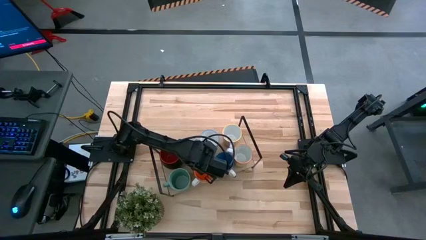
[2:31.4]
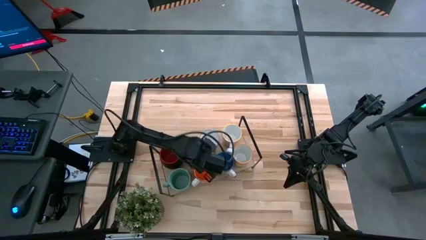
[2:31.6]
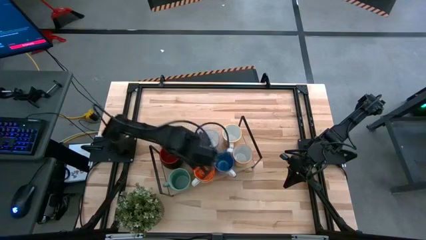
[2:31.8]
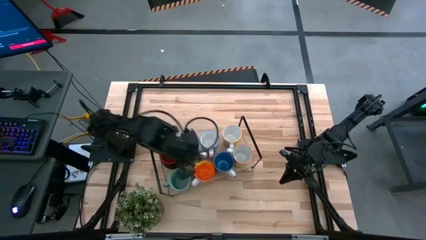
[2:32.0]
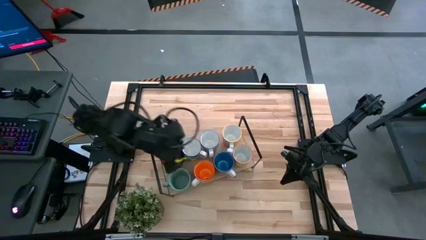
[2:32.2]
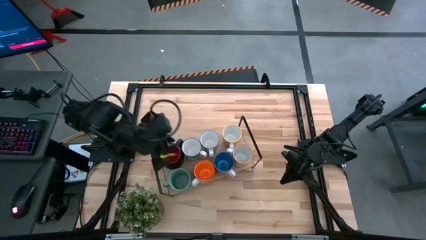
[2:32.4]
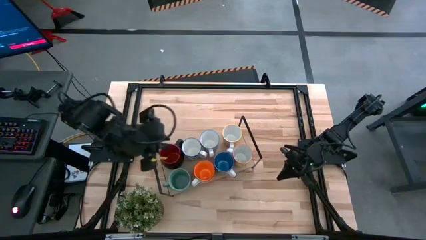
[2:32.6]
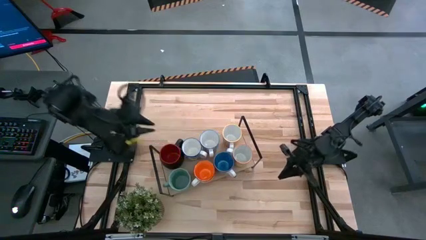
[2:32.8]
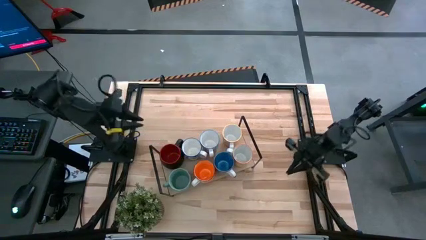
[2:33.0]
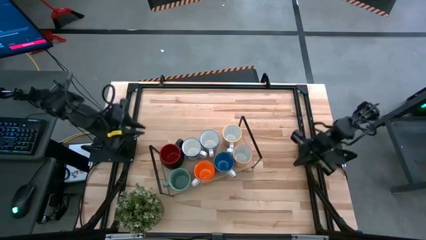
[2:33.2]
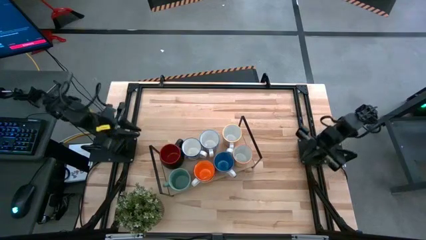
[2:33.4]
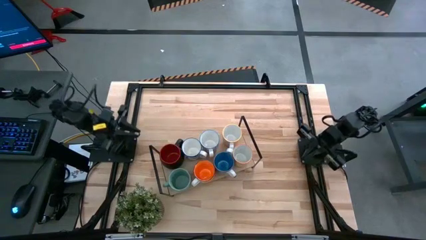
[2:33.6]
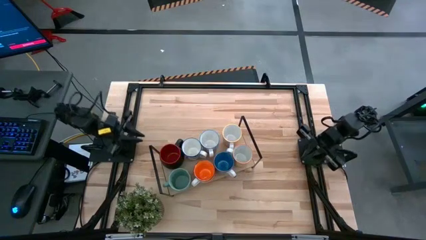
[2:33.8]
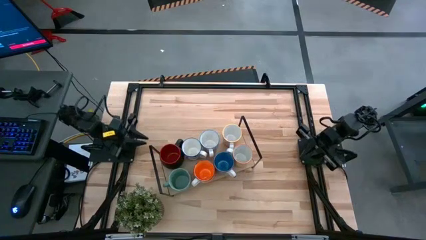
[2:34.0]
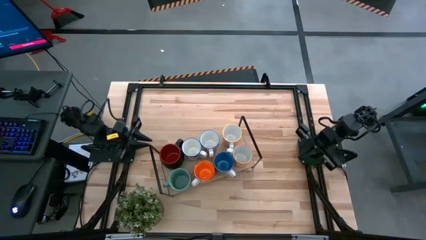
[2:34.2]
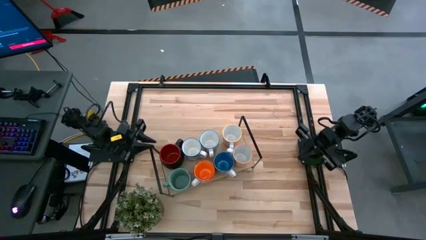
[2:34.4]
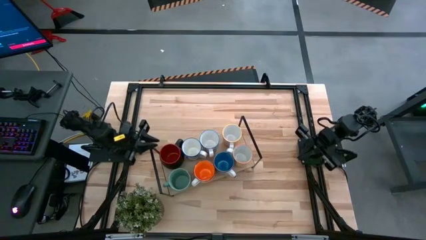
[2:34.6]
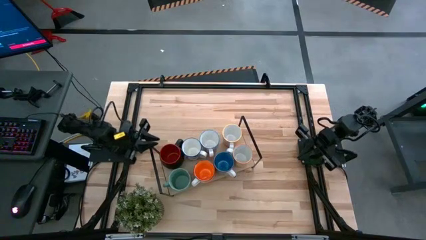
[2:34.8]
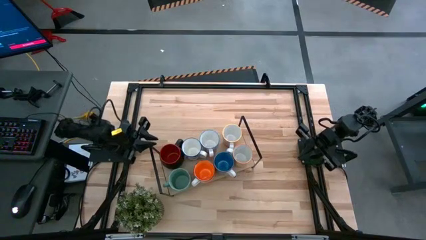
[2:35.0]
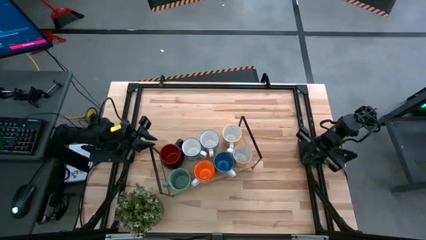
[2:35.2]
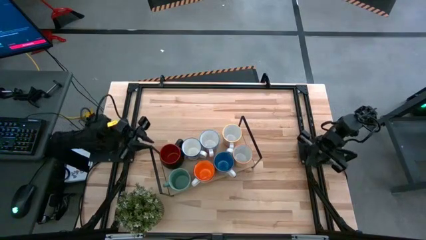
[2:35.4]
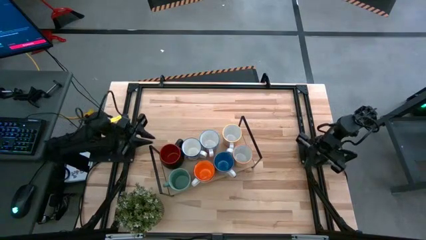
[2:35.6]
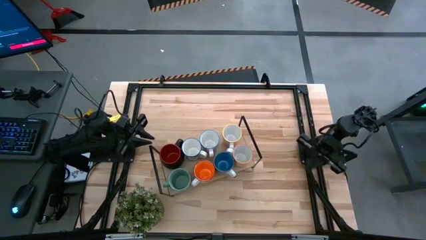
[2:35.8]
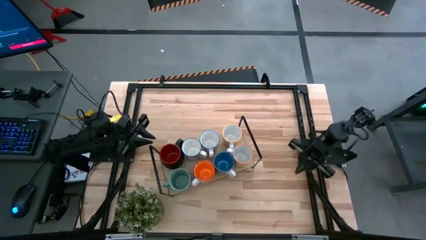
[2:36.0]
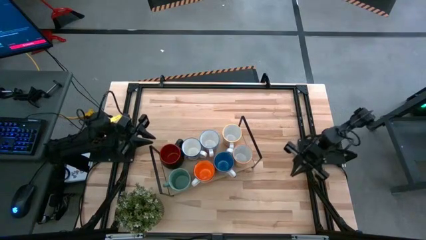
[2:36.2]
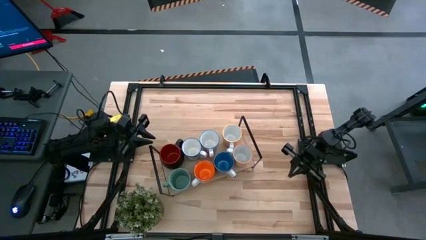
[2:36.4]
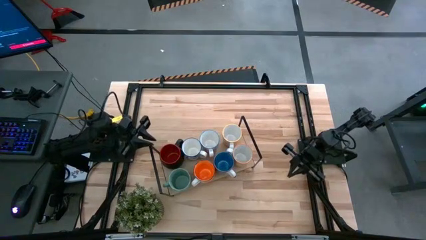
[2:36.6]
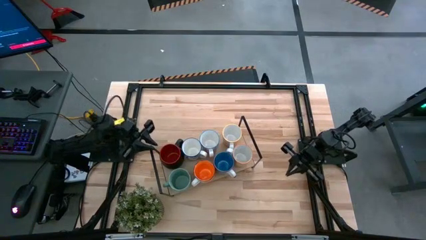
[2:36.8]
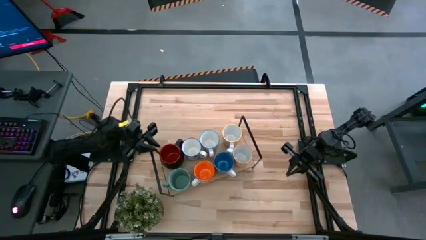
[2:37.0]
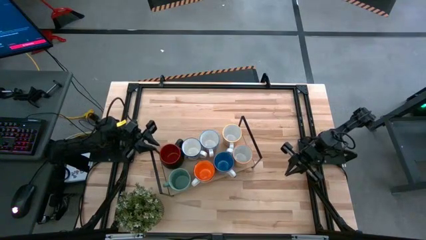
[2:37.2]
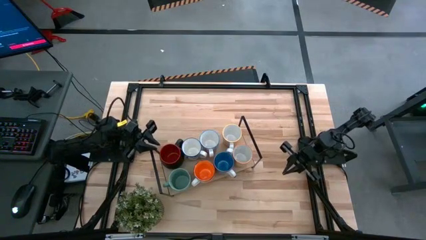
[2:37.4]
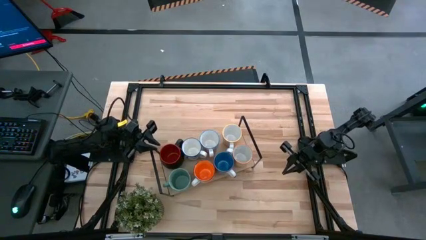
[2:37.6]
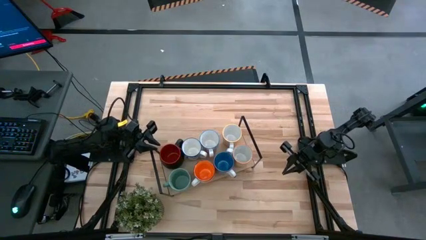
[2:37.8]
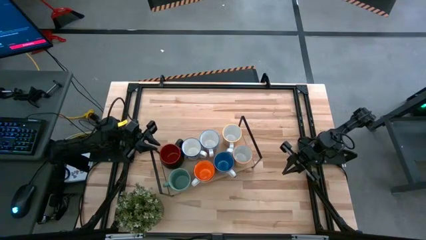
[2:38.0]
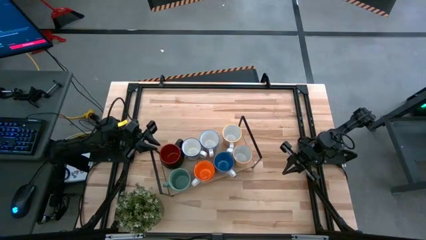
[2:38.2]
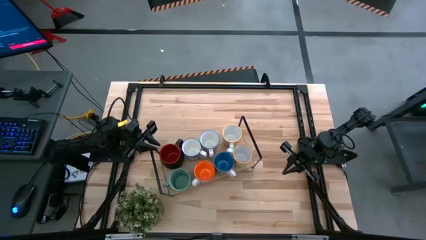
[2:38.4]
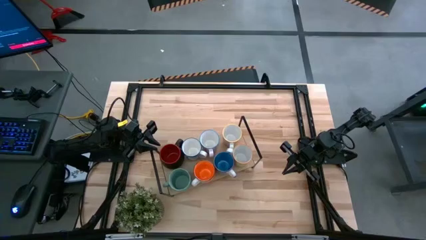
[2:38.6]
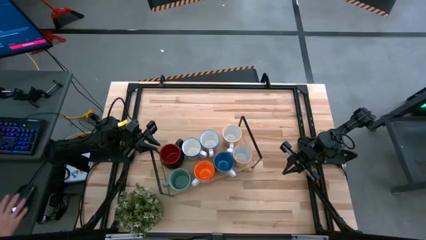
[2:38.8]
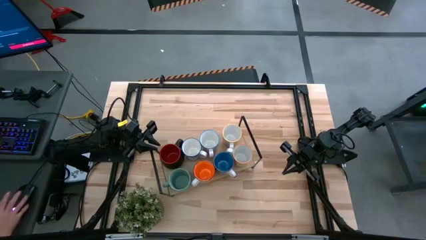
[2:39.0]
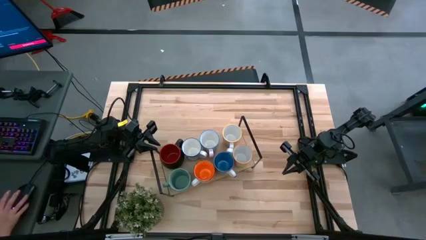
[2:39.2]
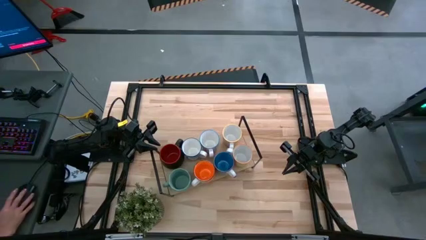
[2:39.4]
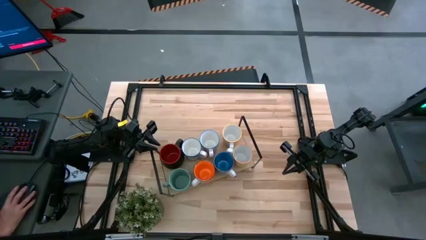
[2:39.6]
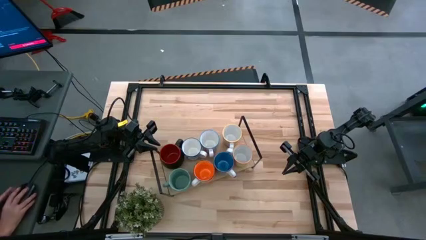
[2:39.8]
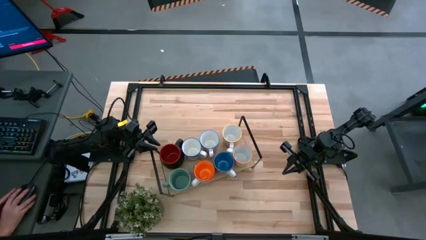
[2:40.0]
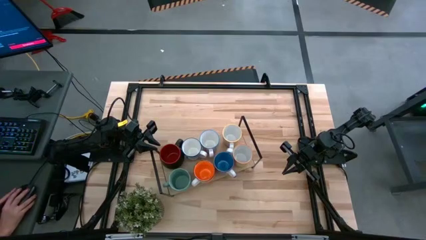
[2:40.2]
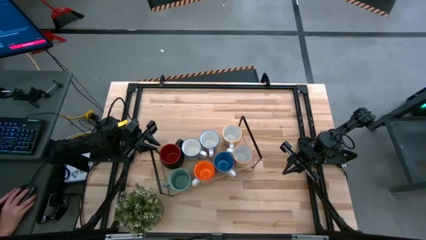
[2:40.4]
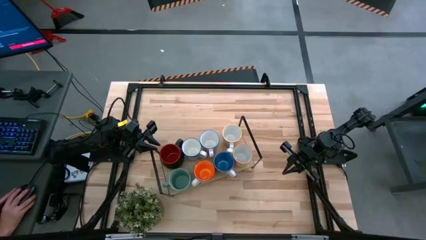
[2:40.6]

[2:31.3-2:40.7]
Task: Place coffee mugs
Return to Home Position

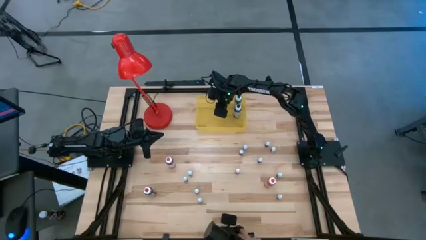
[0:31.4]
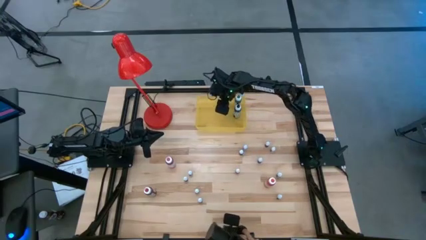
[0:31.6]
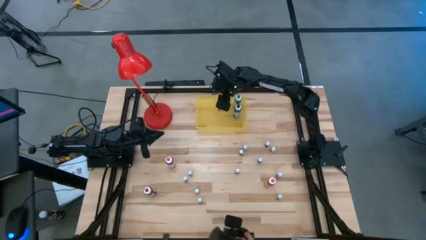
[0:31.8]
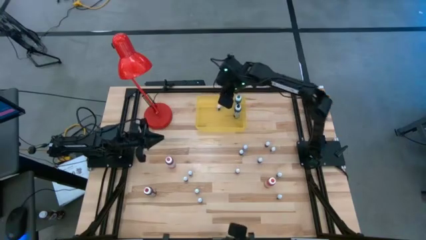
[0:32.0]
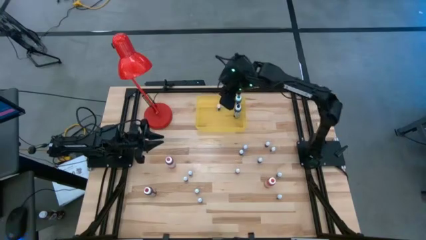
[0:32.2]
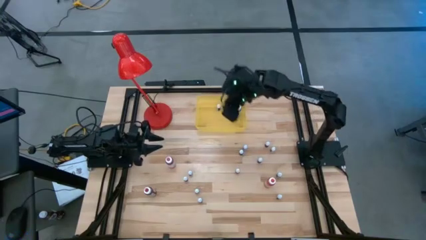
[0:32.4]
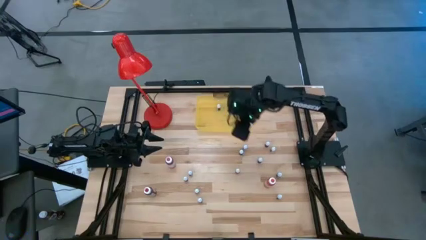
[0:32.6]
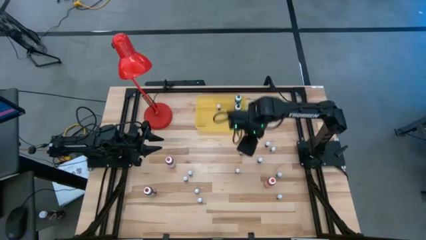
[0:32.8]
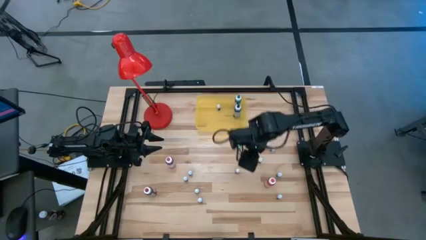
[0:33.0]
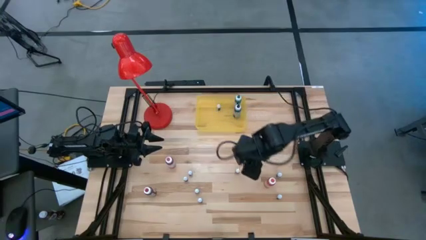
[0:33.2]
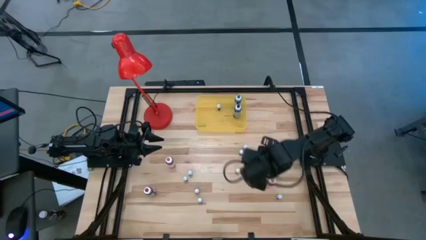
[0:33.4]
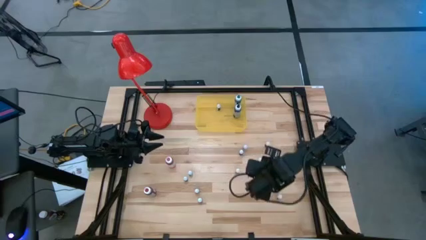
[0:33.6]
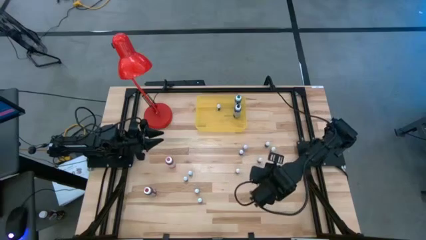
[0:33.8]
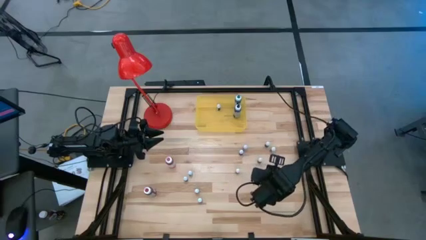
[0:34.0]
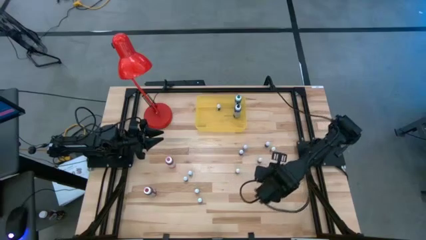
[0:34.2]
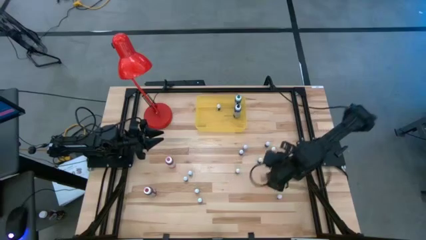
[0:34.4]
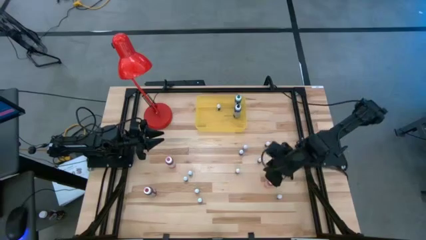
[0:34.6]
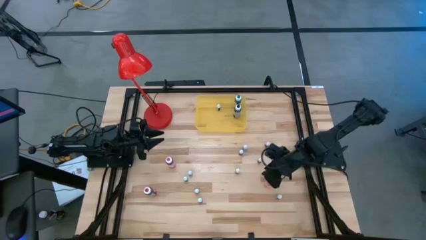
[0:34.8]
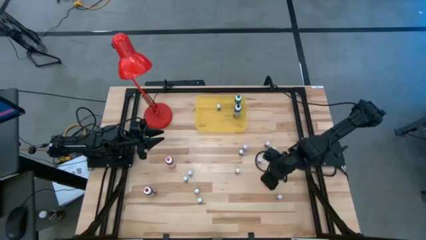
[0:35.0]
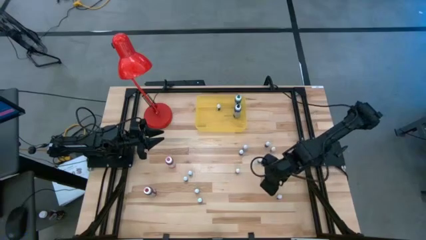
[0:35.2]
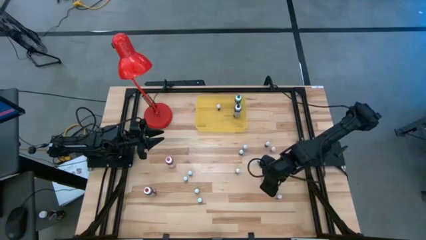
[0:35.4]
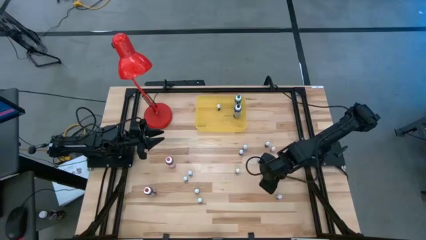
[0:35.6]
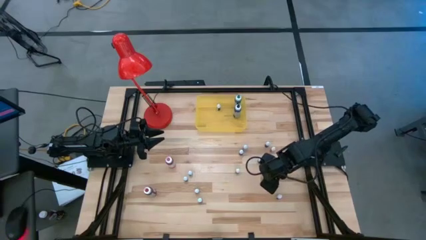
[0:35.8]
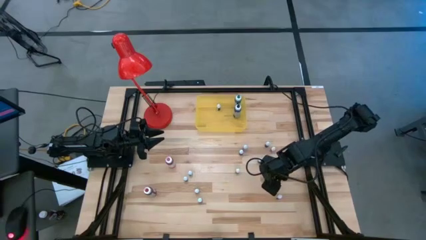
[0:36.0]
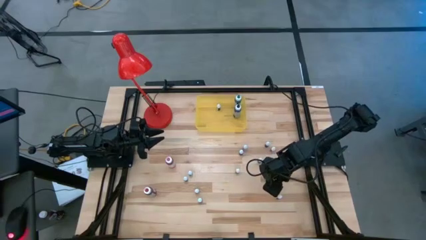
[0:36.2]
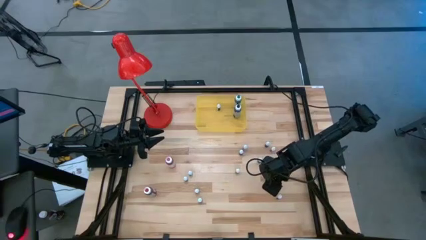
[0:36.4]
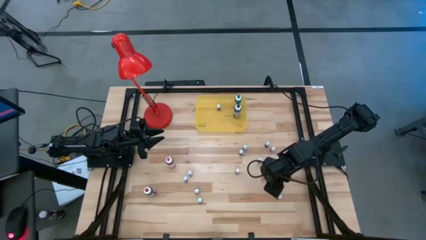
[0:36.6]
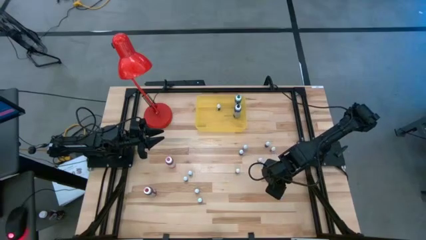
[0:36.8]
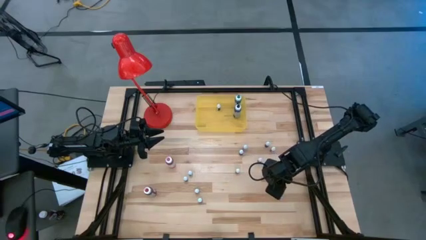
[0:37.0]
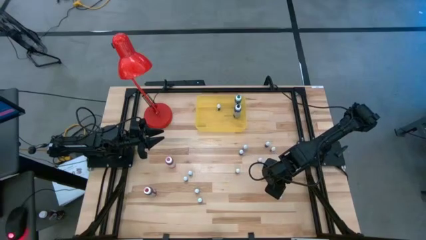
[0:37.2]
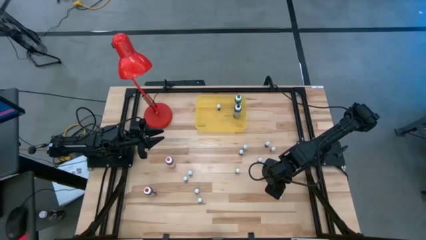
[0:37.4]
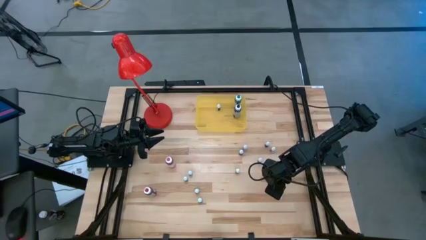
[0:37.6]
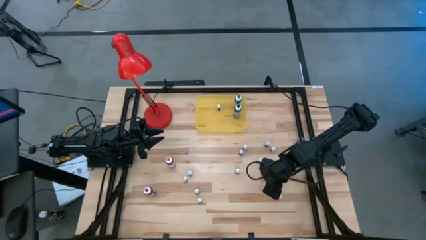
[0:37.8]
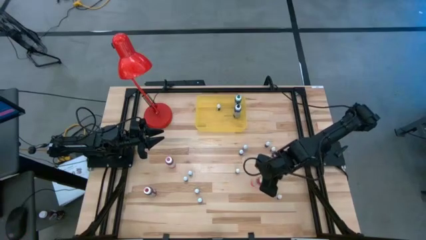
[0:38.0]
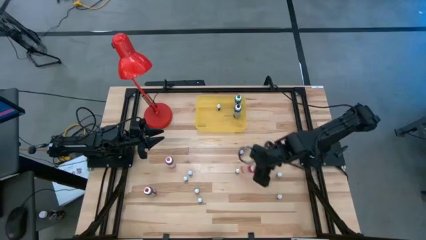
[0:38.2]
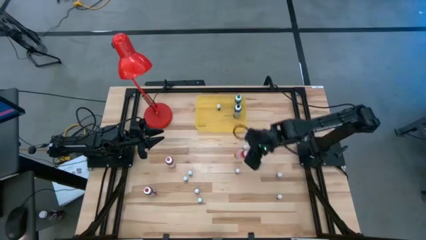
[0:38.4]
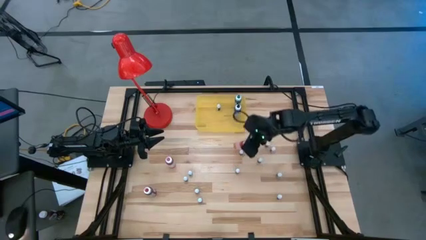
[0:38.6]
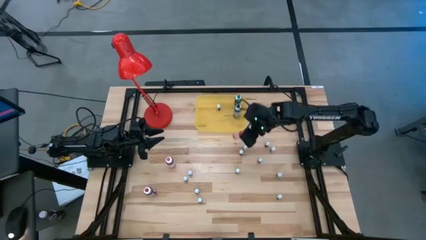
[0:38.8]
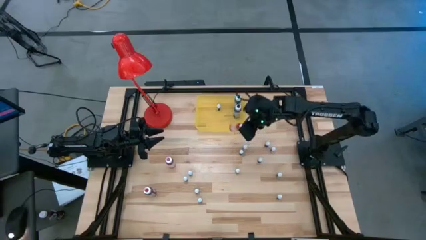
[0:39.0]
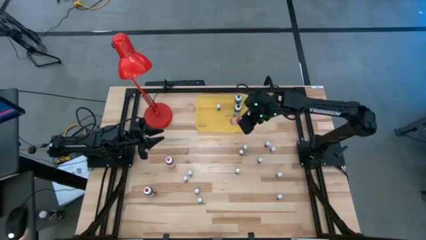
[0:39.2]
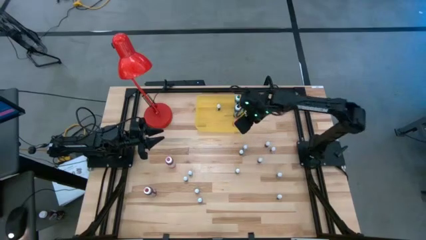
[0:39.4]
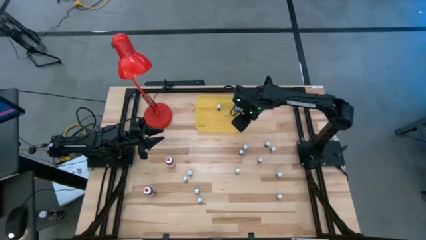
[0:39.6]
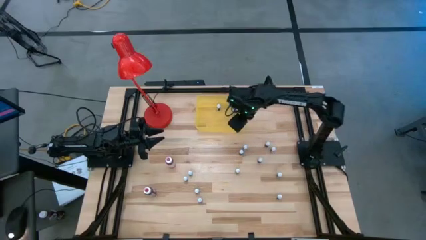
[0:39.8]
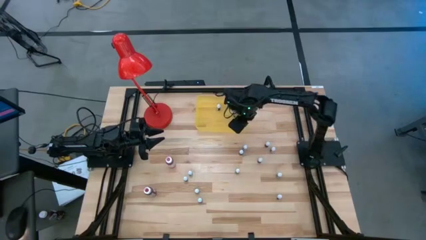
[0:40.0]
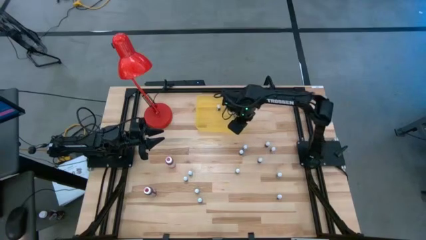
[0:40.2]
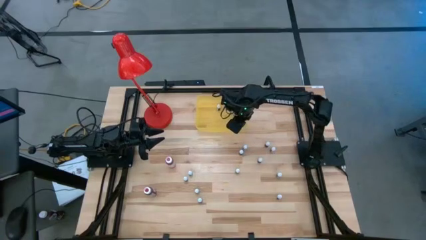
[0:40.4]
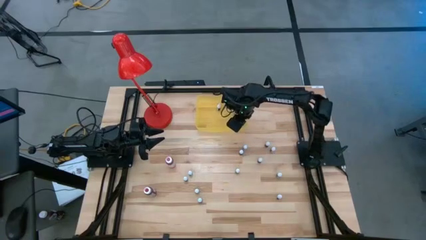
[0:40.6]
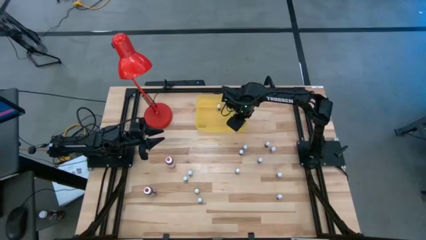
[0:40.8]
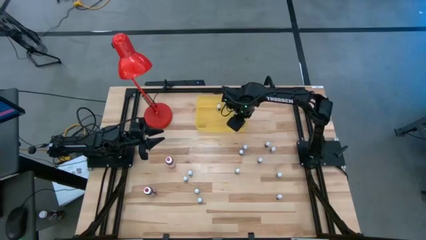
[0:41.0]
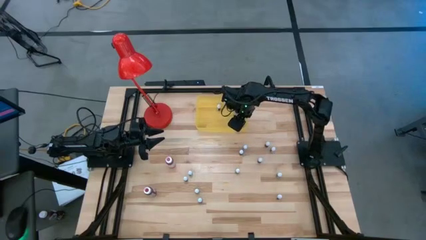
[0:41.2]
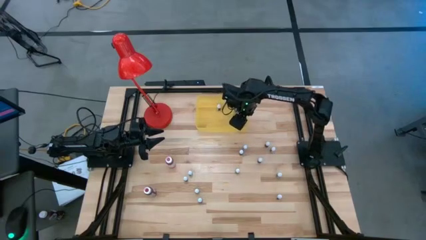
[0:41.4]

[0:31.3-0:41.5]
Task: Pick & Place food coloring
Put the large orange food coloring bottle into the yellow bin
